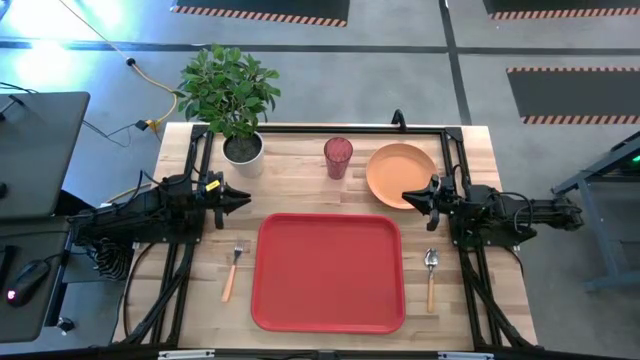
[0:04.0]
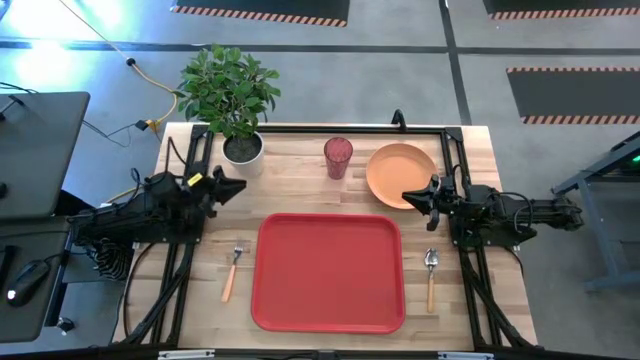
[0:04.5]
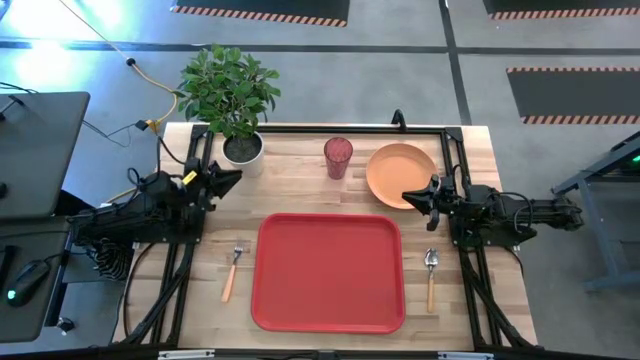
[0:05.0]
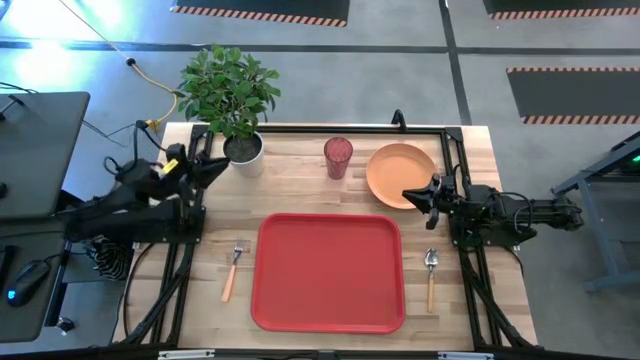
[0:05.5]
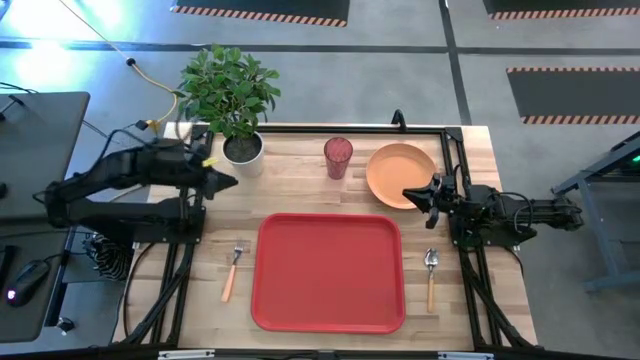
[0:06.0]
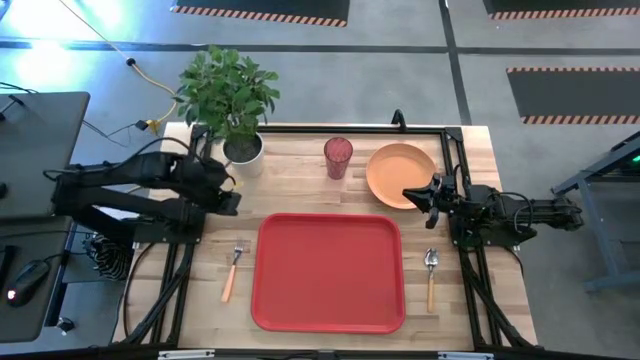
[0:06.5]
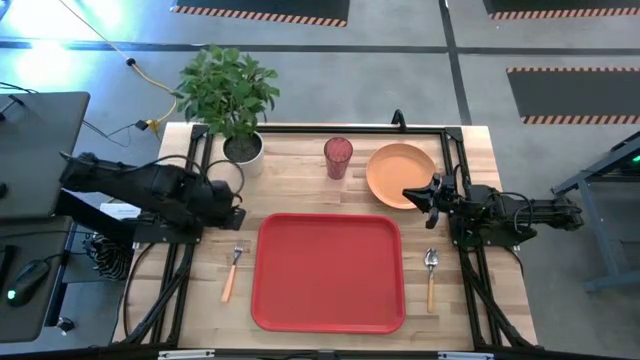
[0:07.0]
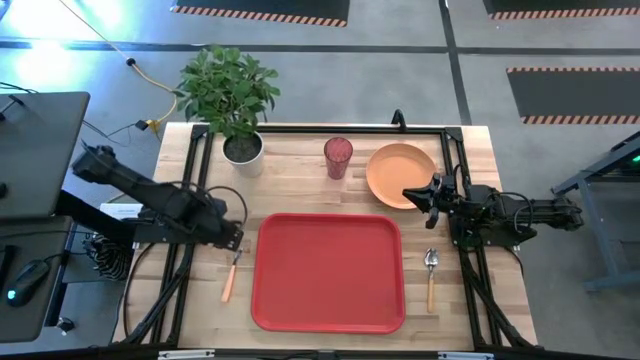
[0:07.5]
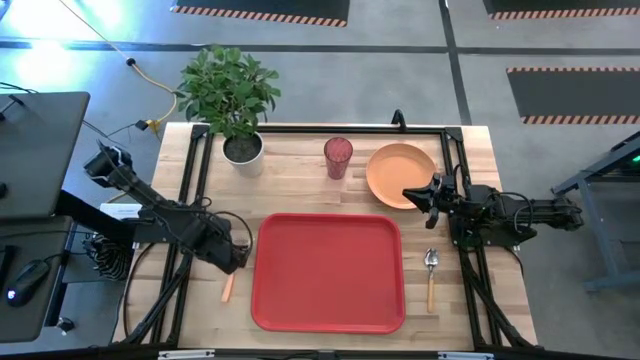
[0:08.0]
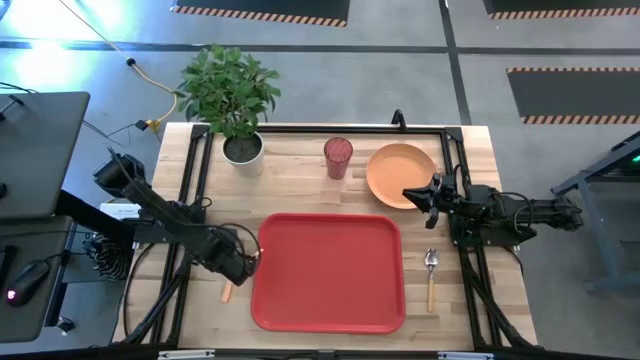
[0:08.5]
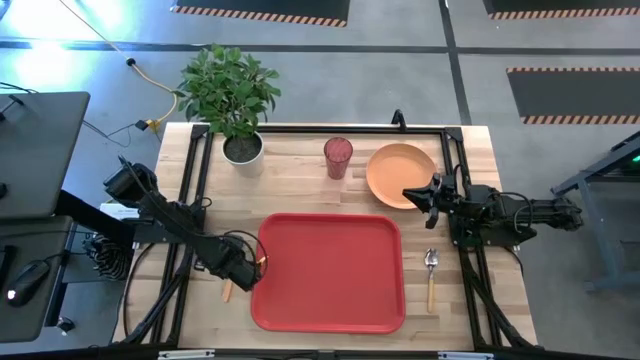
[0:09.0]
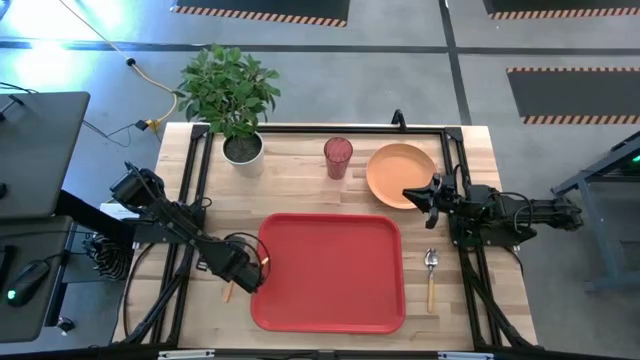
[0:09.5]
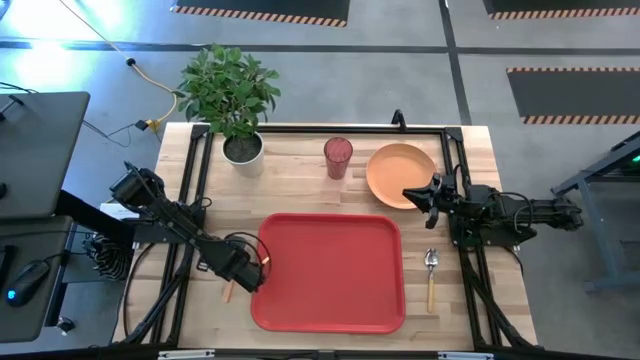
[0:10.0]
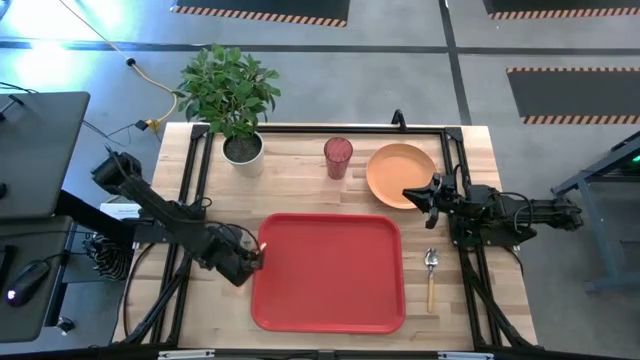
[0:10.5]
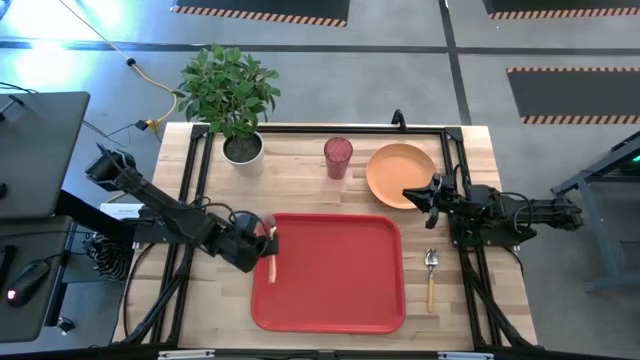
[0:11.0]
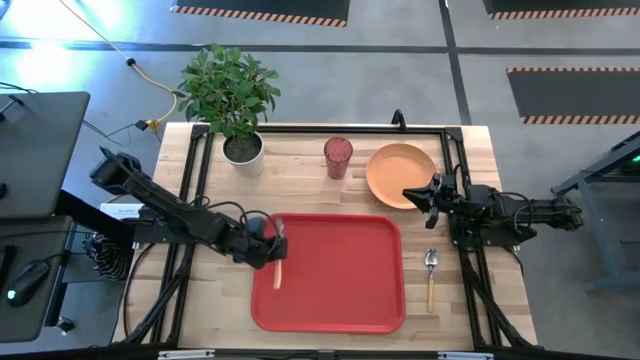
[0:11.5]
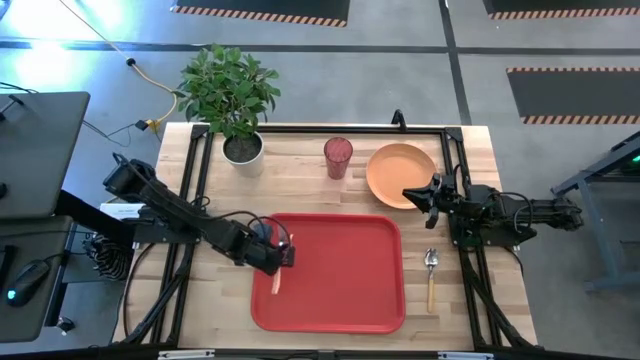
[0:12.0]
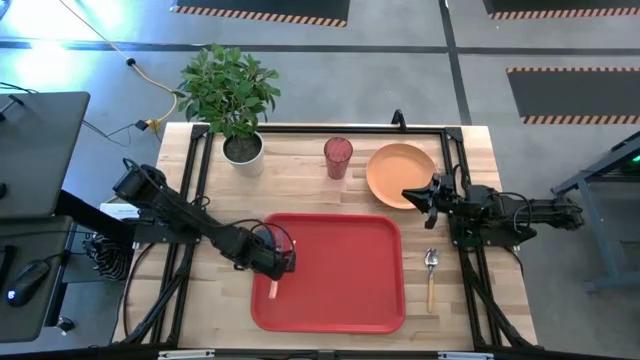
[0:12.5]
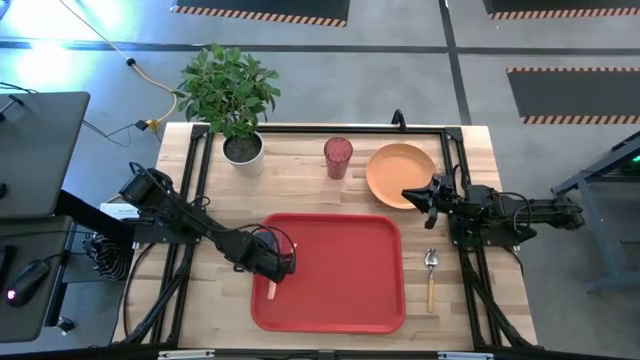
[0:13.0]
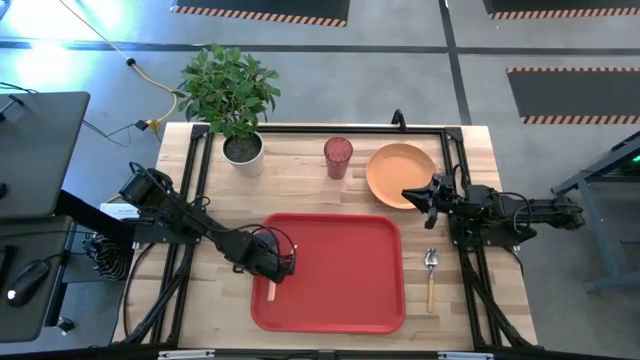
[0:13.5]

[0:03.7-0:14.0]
Task: Pick and place plate/cup/fork/spoon on tray
Put the orange fork on the red serving tray

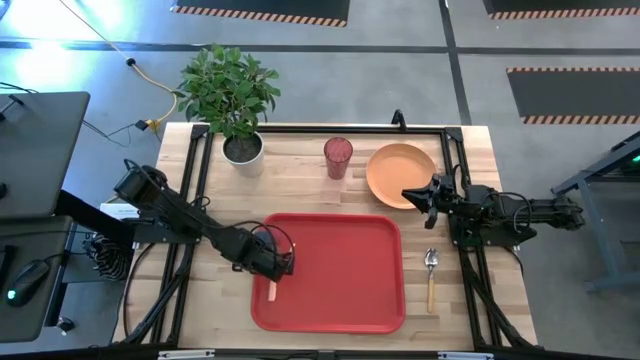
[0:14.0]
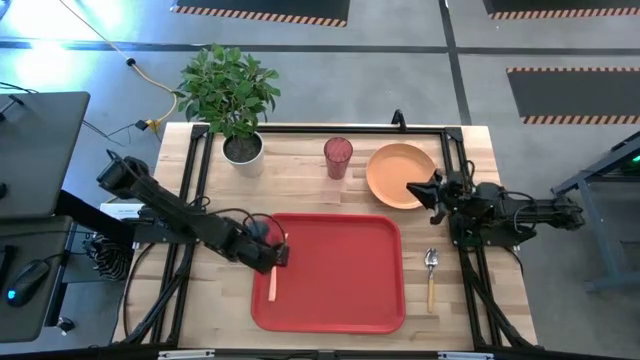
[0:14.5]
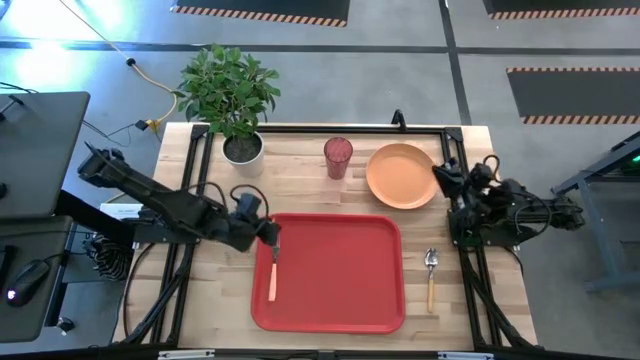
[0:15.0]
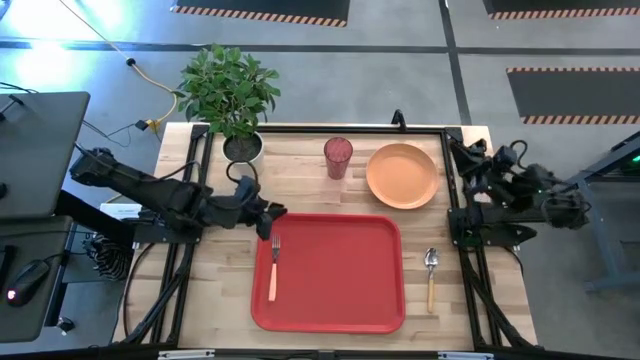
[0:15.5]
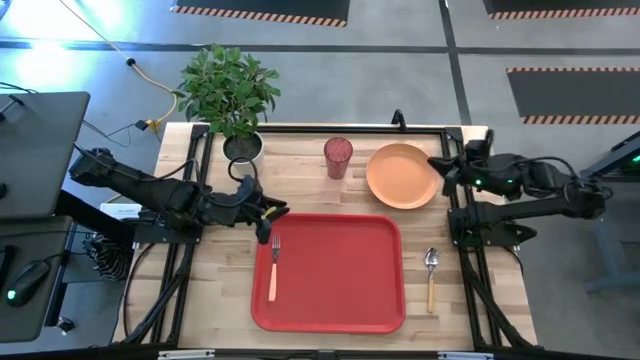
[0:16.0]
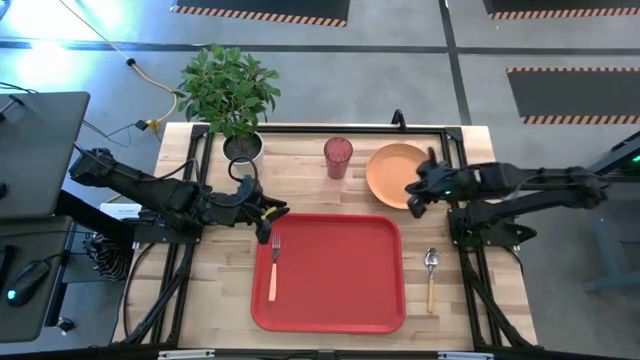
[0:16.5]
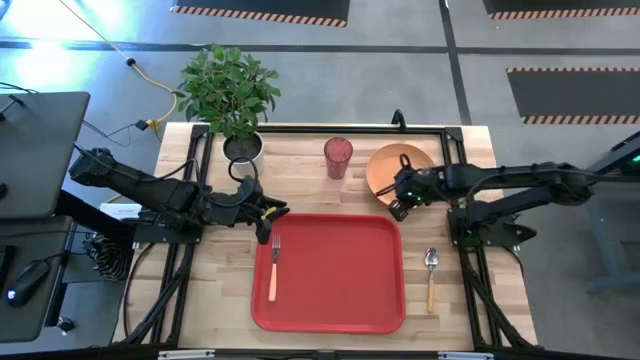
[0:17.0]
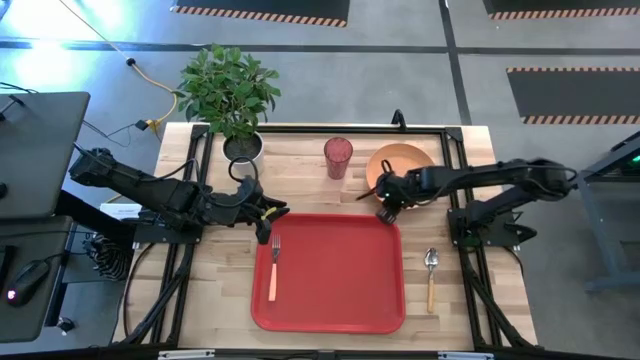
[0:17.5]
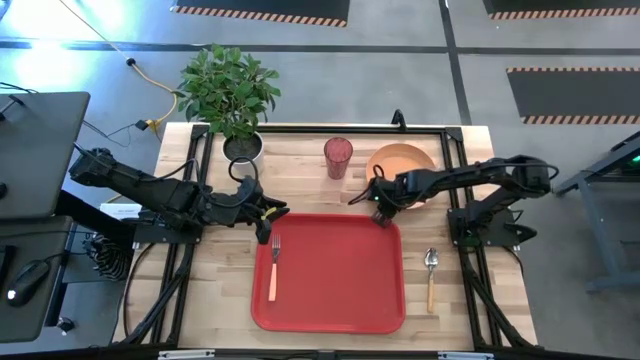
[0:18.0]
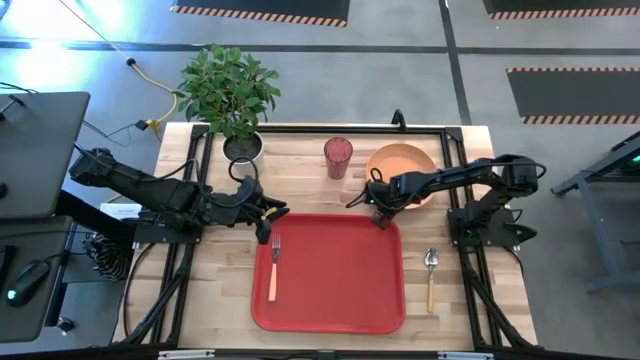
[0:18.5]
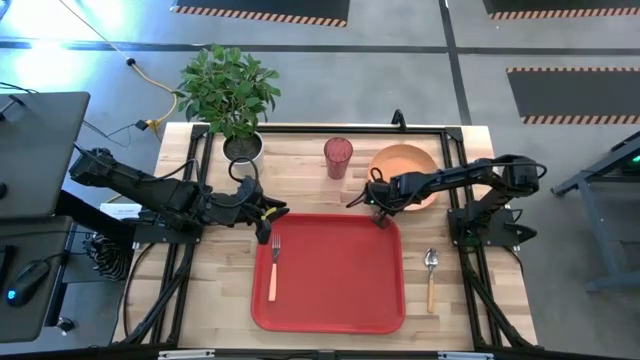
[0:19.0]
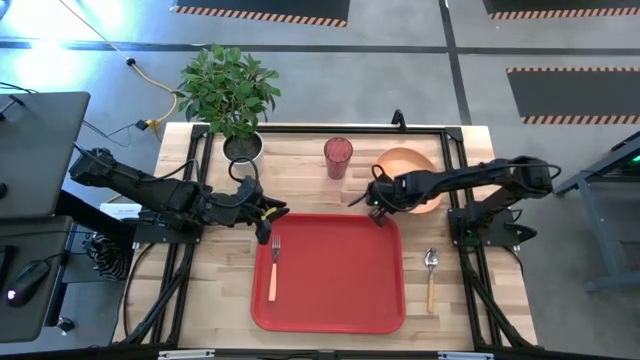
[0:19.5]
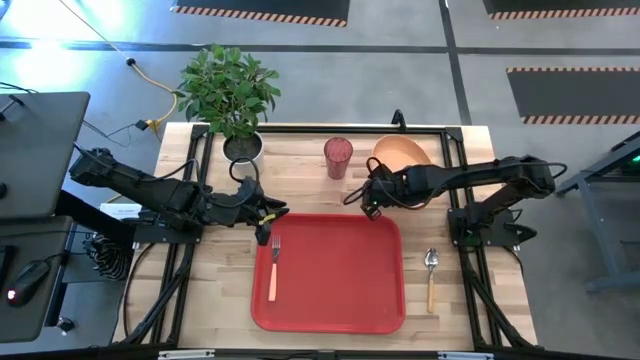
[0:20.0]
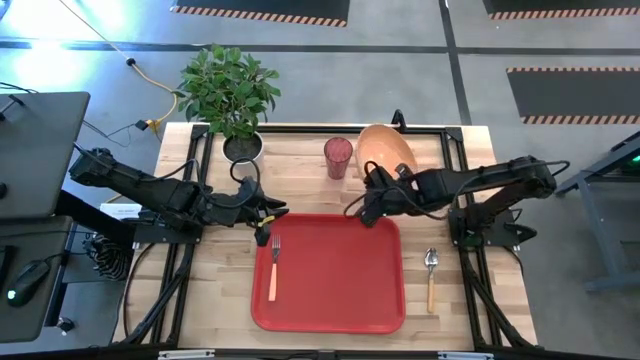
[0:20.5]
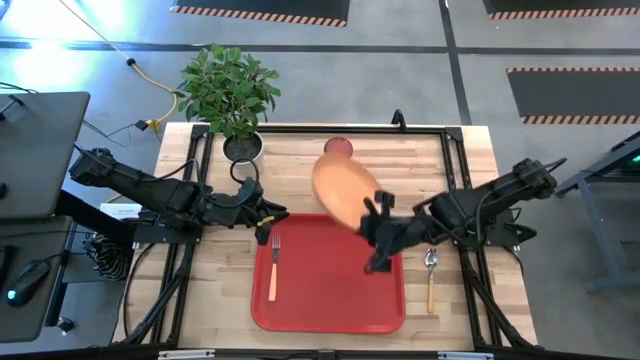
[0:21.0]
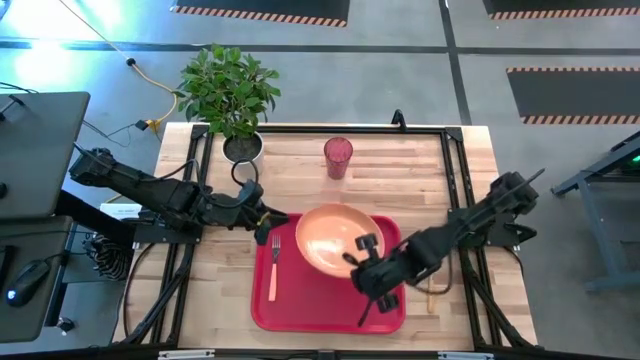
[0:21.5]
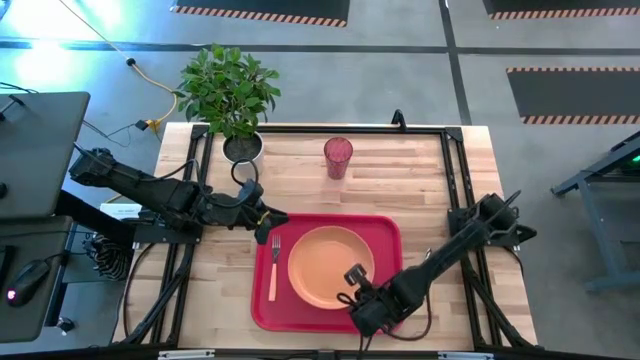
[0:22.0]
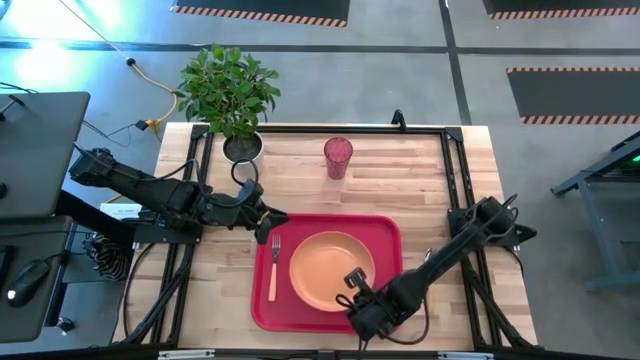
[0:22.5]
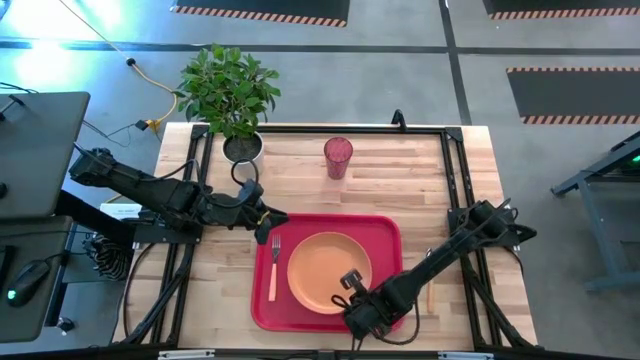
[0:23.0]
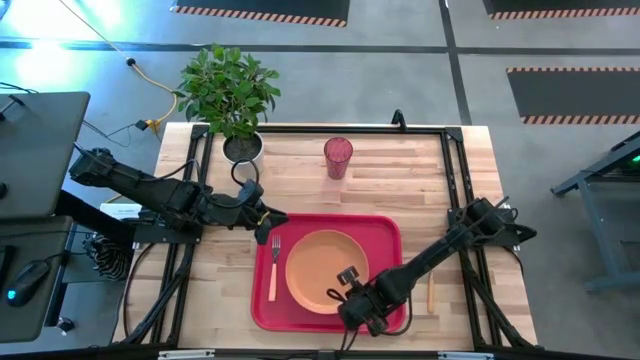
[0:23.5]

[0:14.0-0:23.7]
Put the orange plate on the red serving tray to the right of the orange fork

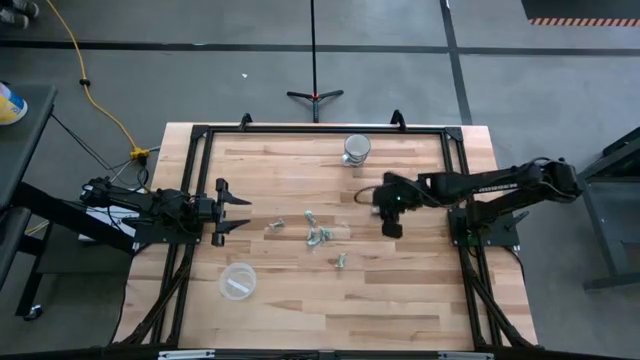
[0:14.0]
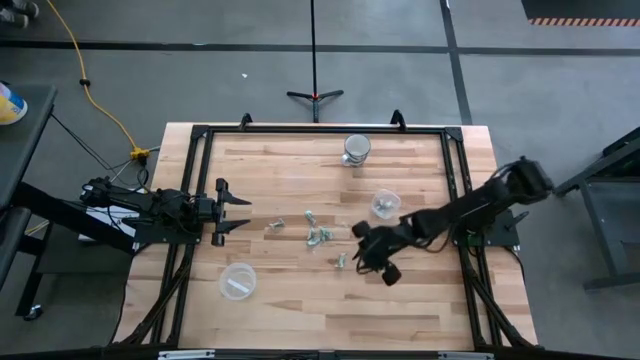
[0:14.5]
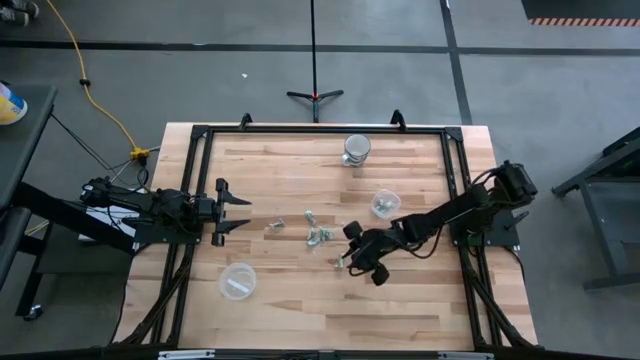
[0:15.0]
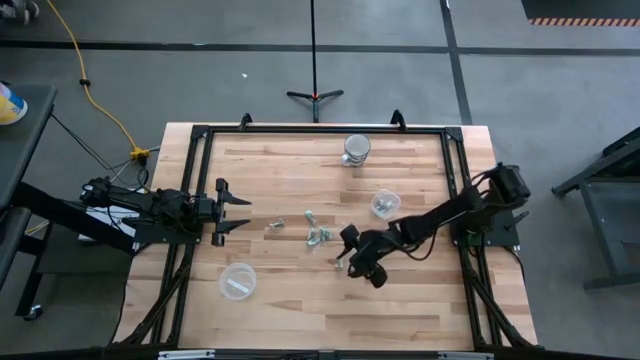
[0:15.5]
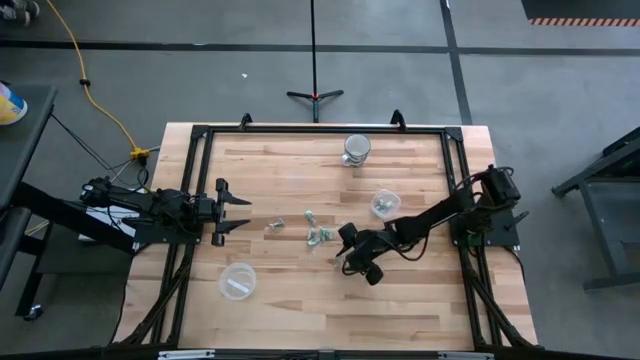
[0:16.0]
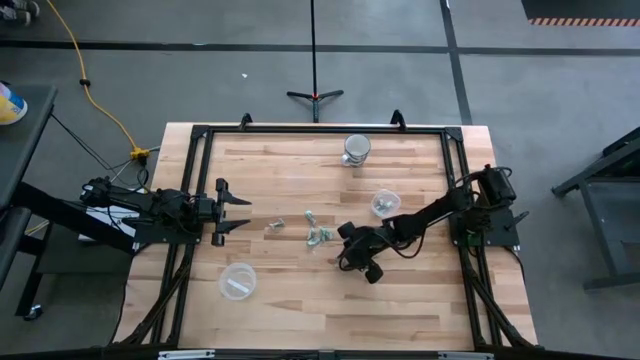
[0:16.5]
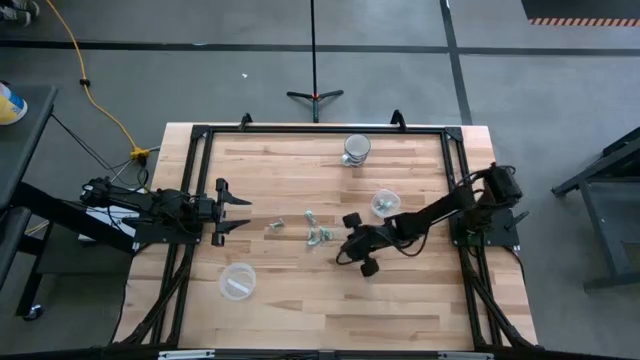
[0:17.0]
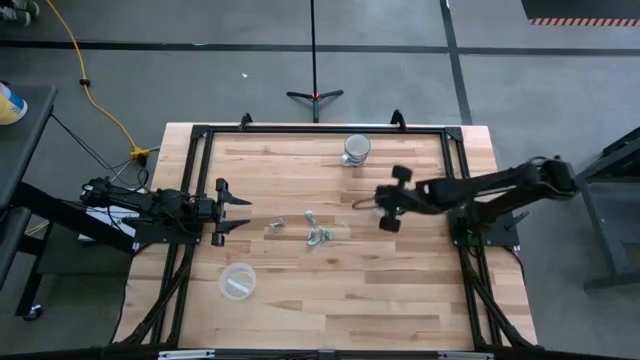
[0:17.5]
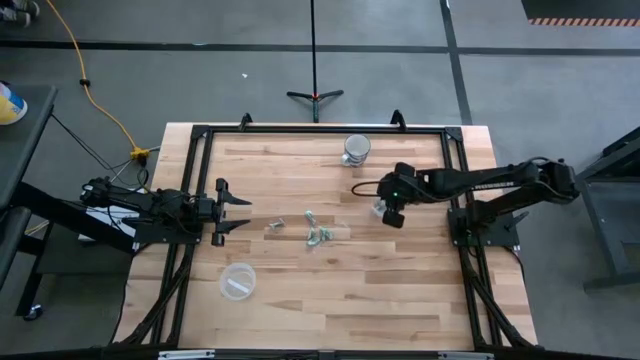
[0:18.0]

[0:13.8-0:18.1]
Task: Pick and place Stevia / Truvia into bins
Put the stevia packet into the square transparent container
